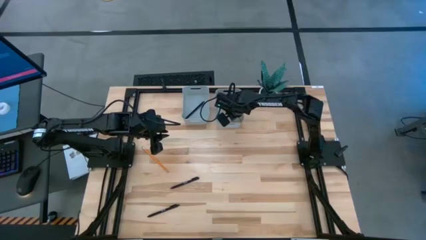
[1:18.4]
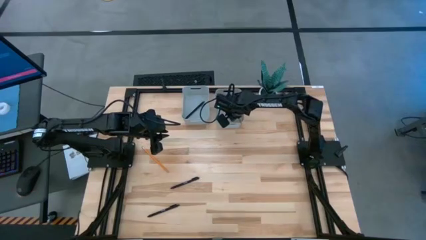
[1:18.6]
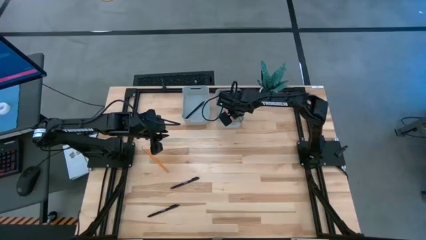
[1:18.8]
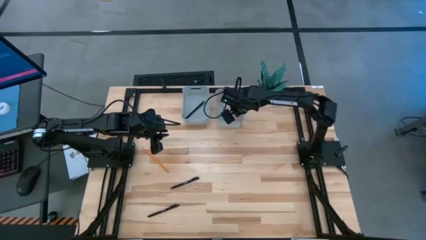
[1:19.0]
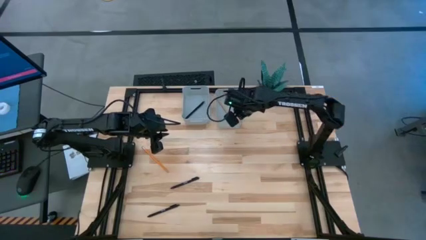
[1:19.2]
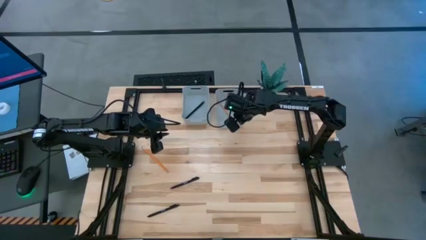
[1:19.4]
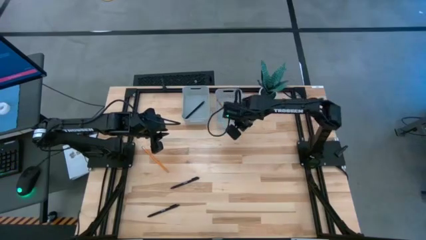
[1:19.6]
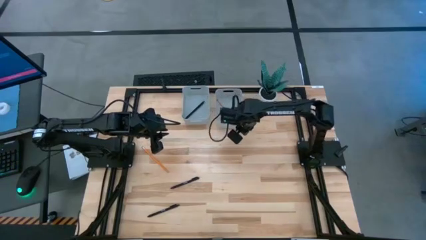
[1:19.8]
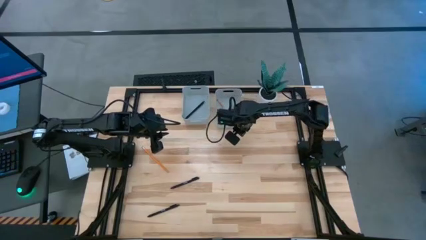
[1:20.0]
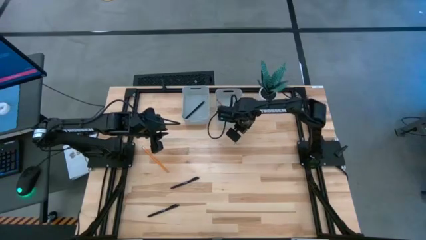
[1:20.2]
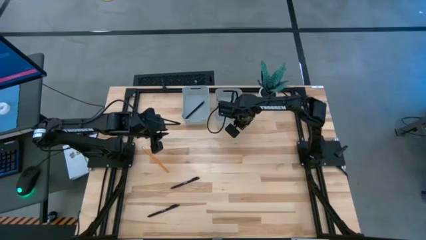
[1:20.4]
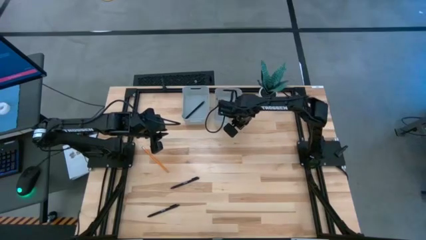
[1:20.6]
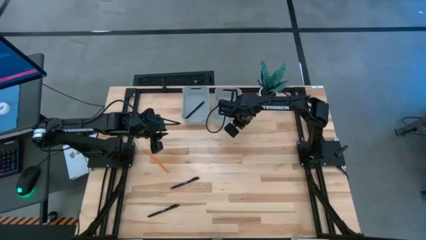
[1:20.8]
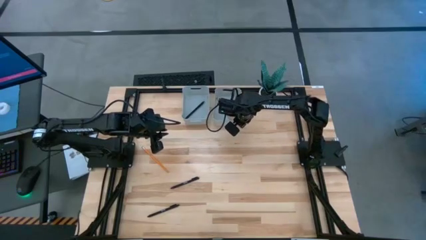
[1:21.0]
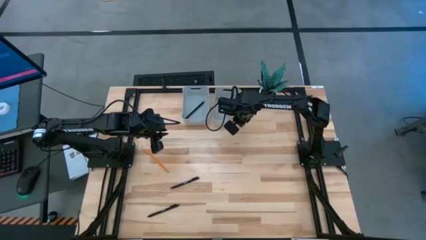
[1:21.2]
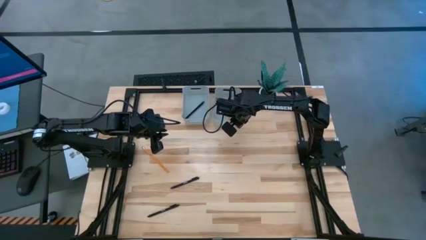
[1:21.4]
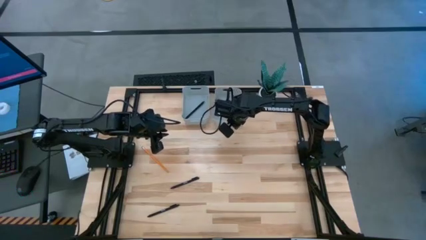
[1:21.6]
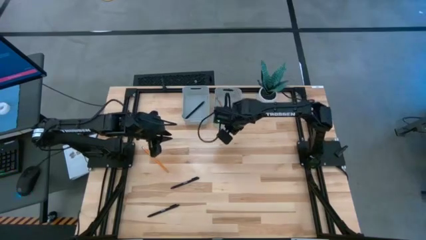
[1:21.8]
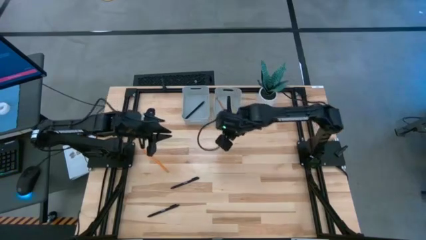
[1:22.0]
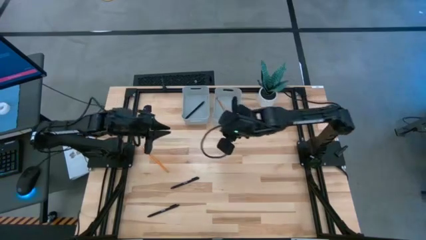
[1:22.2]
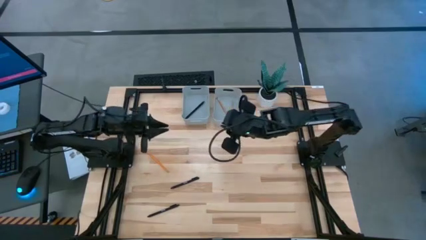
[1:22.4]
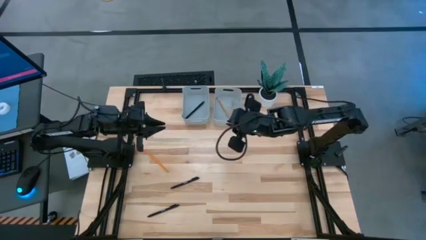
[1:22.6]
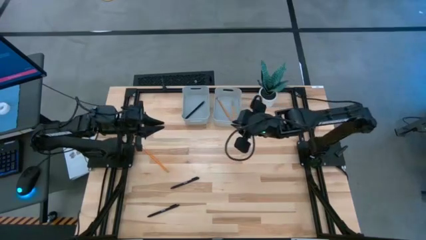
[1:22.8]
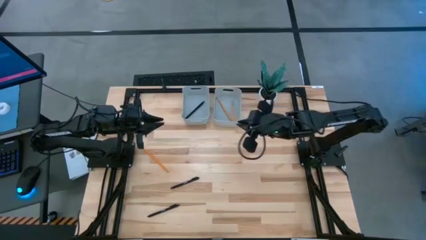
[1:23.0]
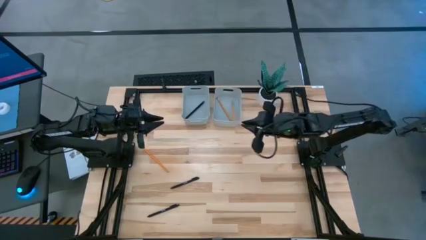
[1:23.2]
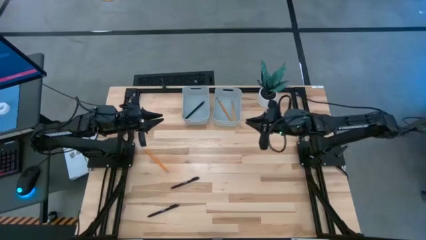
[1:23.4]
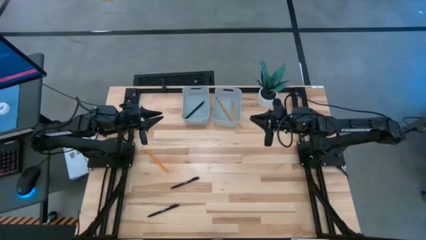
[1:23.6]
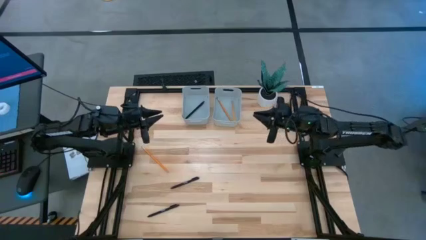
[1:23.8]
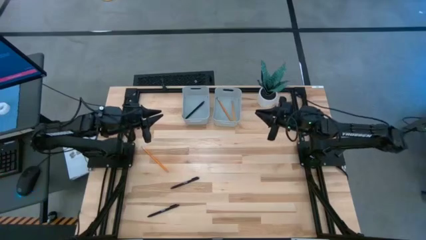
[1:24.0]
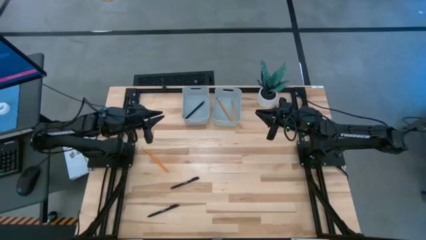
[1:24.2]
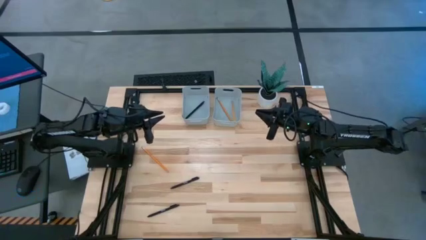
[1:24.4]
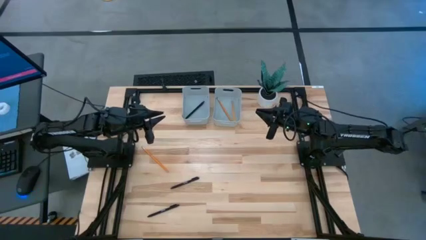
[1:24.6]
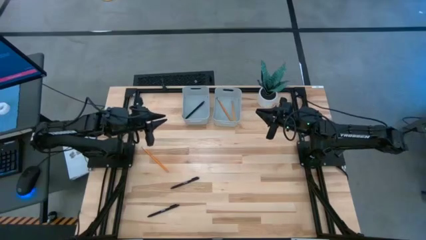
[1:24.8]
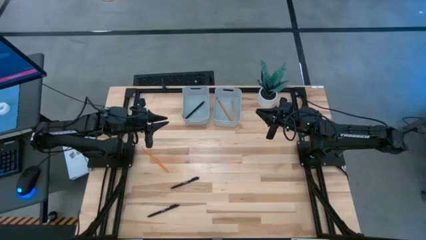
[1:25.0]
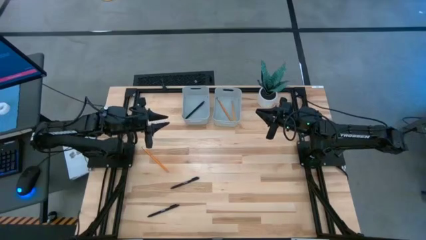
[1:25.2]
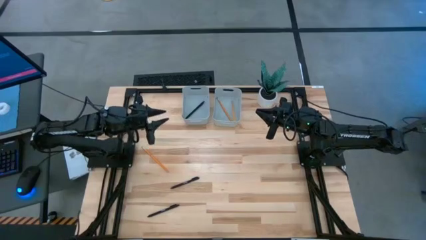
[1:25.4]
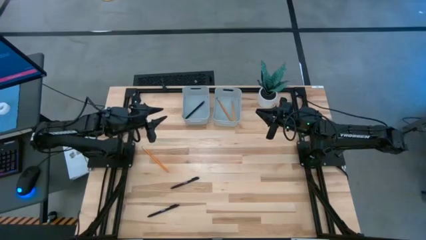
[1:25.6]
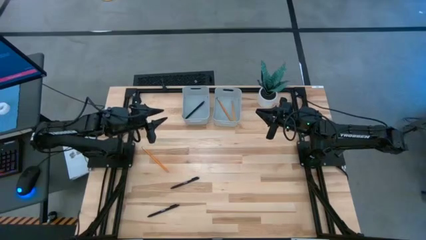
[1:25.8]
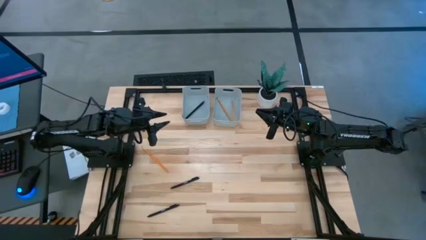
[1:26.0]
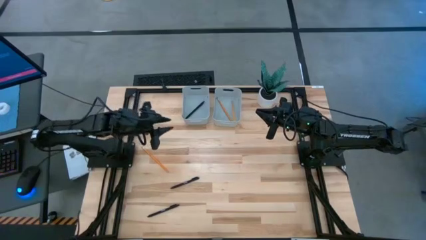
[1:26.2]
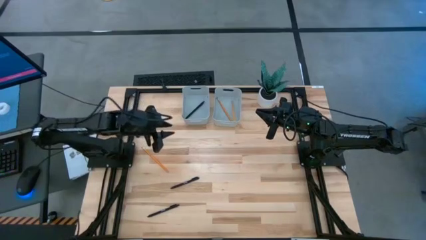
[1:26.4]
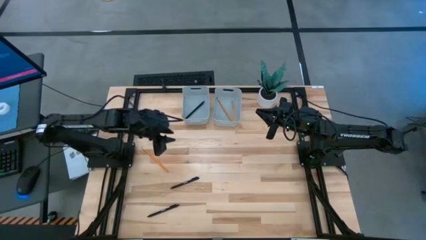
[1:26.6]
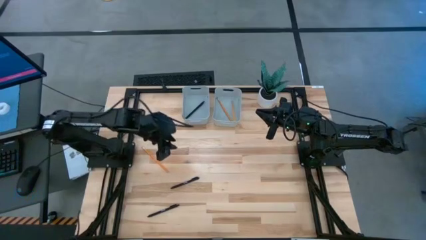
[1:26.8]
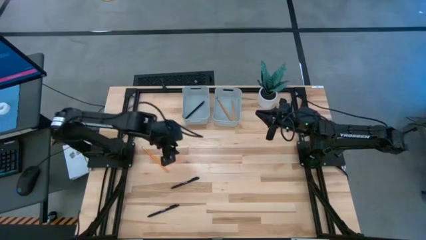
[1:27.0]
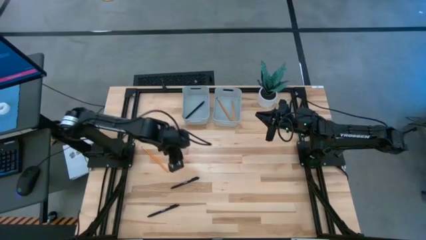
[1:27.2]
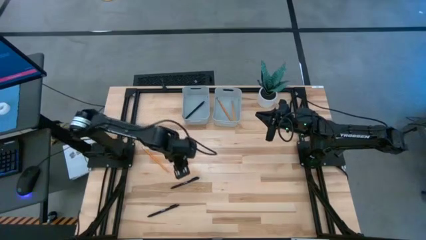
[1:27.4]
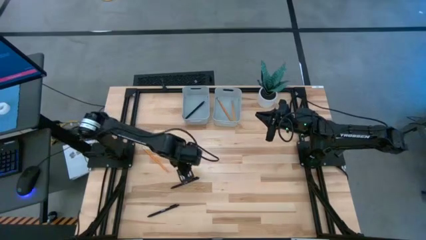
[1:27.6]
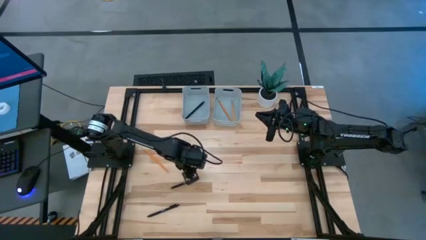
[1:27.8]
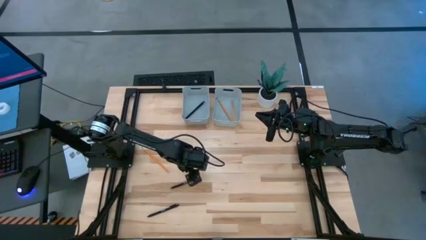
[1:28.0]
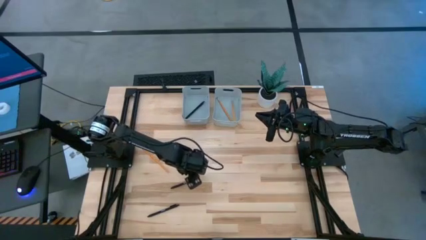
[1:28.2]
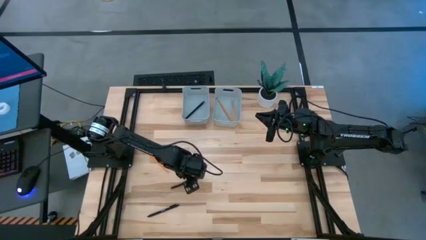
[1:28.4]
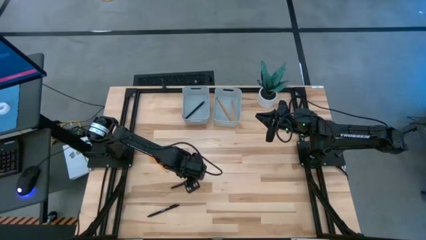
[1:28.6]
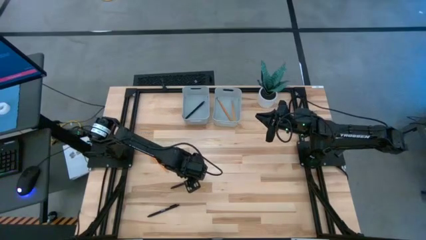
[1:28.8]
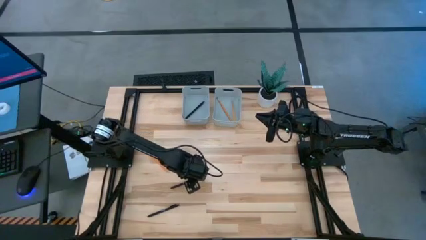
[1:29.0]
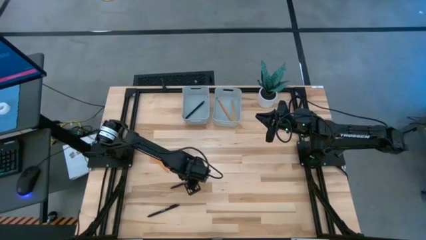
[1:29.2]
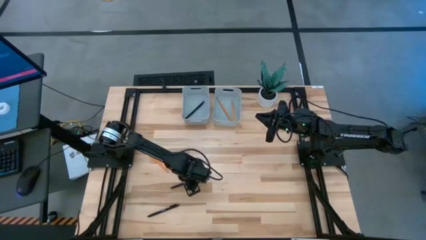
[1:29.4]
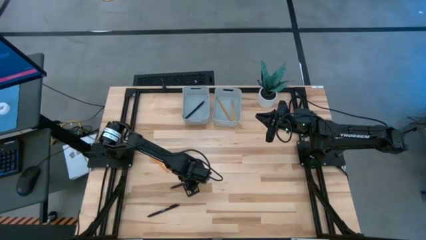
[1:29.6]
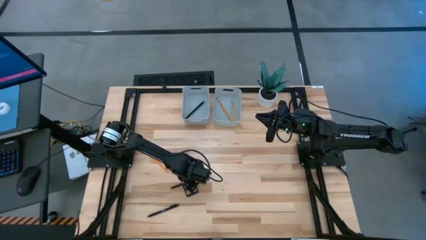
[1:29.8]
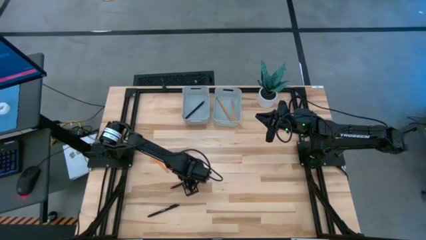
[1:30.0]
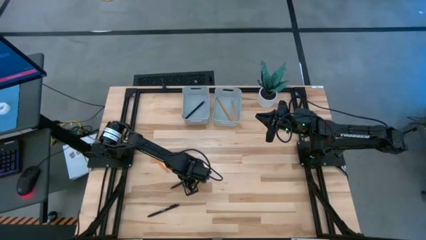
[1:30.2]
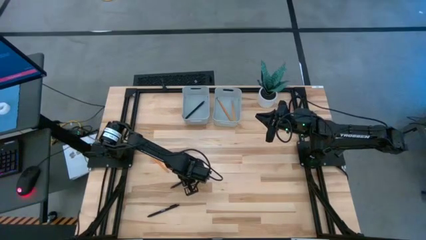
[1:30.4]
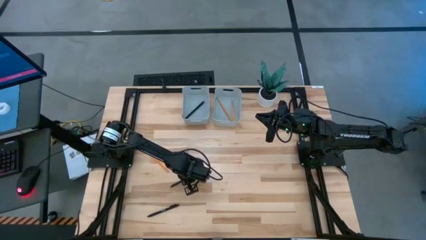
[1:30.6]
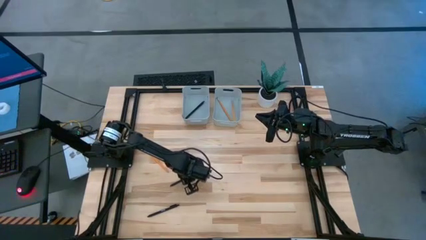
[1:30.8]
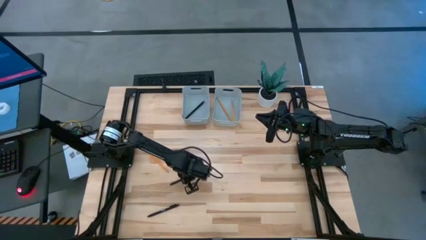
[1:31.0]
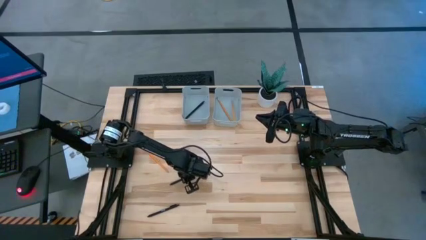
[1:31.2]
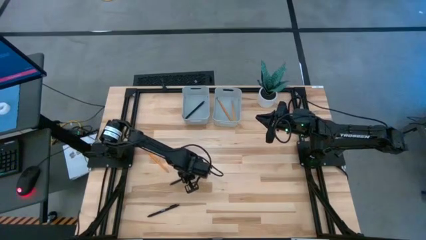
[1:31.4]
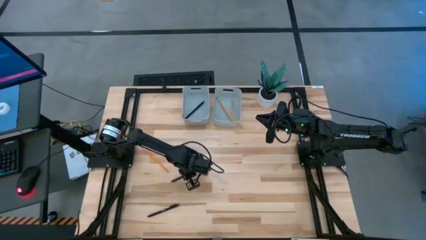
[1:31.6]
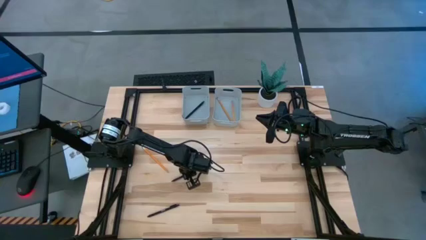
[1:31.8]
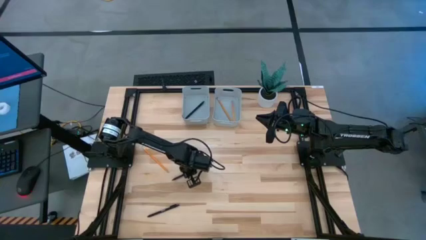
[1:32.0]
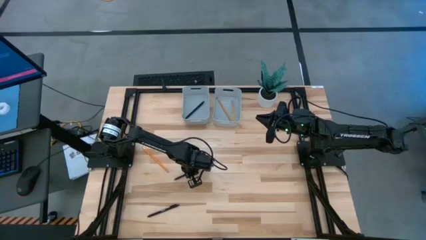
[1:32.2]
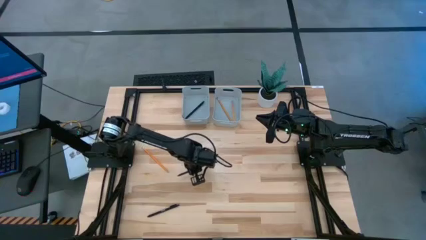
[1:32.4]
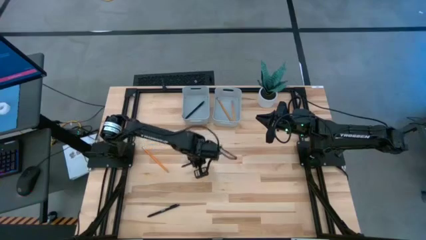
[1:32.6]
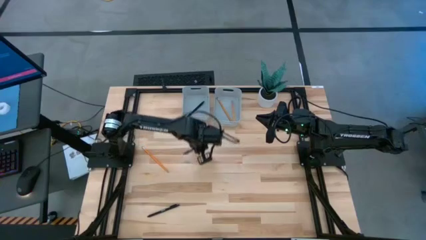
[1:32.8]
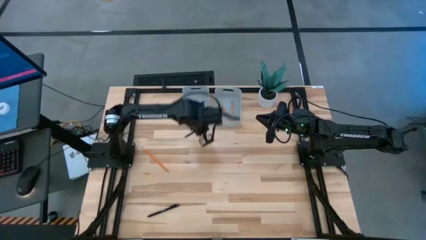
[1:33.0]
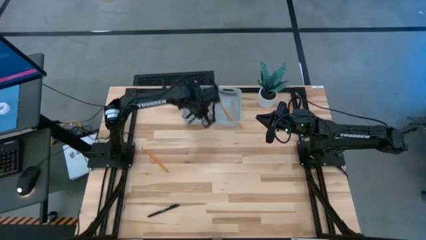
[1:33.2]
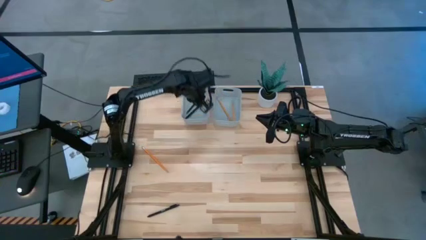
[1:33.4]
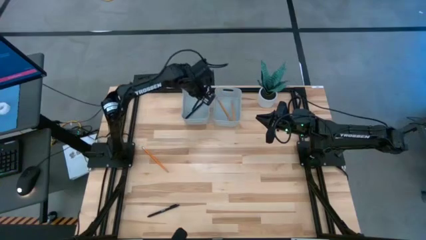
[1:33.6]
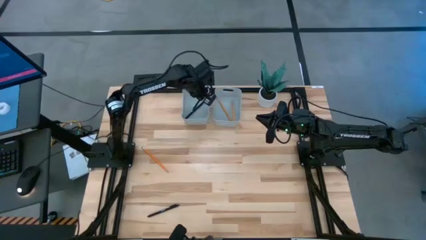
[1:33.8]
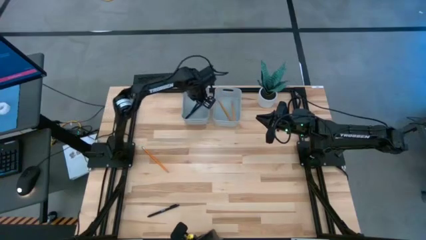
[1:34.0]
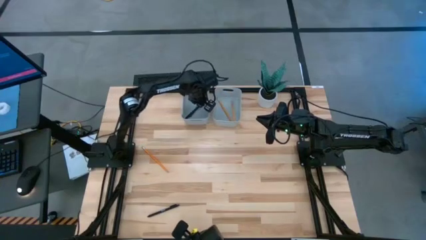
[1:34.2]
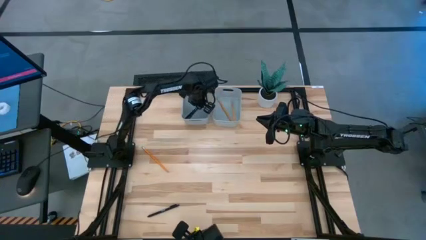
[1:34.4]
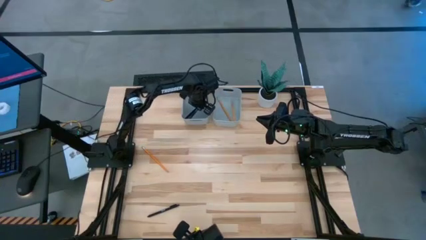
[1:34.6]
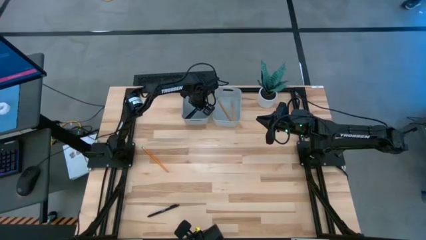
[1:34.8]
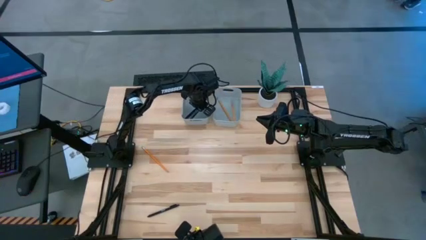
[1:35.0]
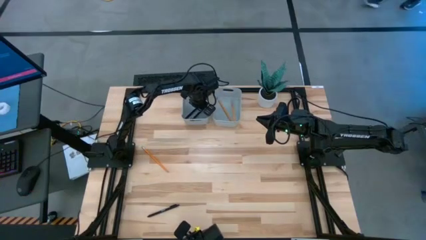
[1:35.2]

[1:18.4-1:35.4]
Task: Sort pens & pencils
Put the top black pen into the left gray bin
